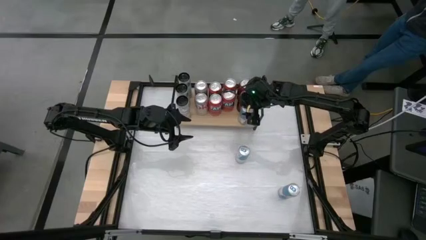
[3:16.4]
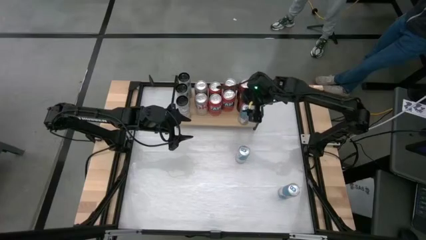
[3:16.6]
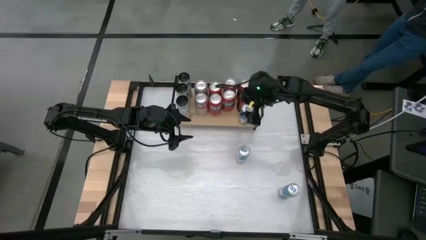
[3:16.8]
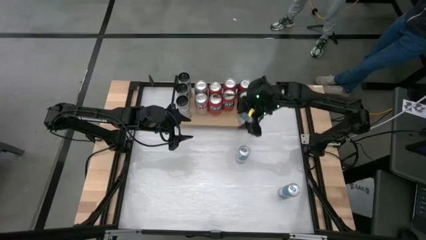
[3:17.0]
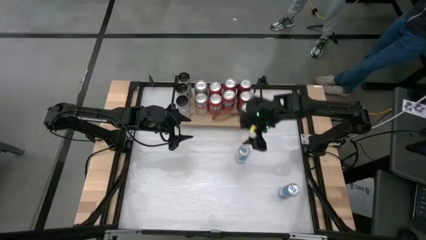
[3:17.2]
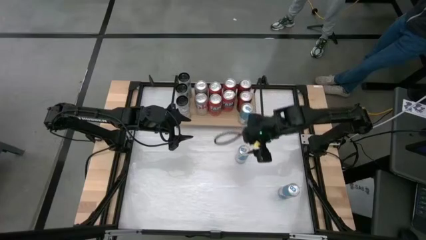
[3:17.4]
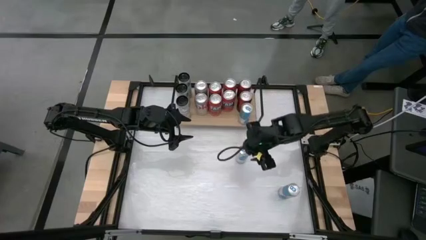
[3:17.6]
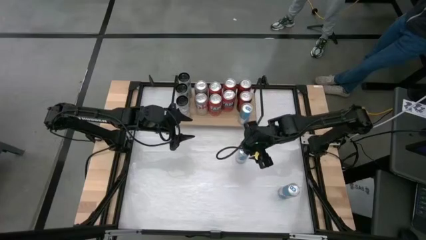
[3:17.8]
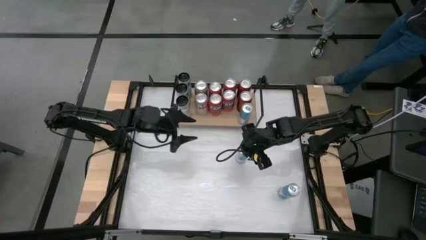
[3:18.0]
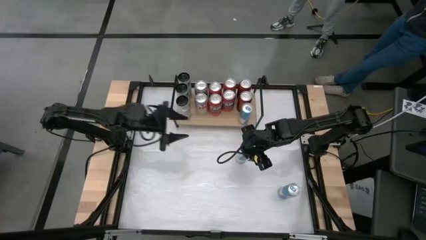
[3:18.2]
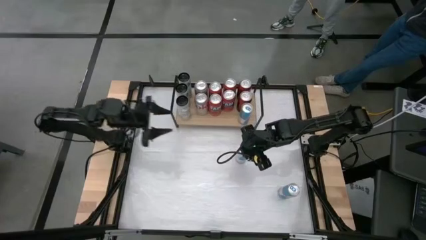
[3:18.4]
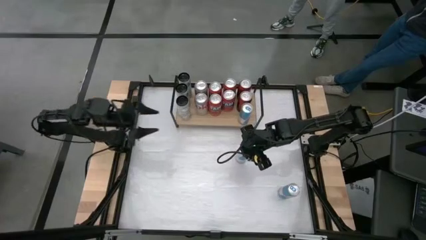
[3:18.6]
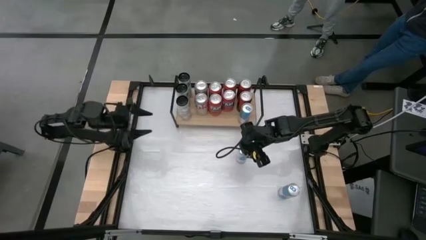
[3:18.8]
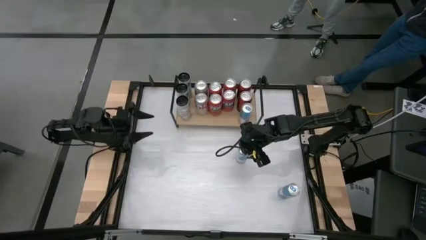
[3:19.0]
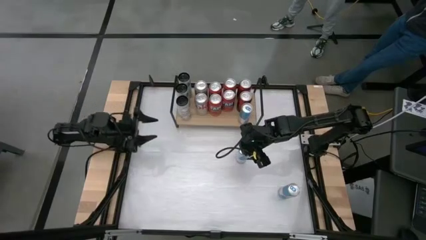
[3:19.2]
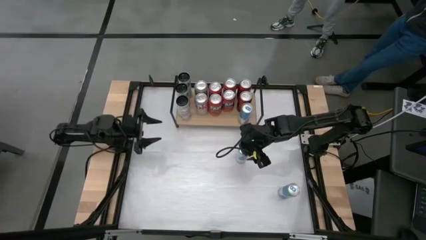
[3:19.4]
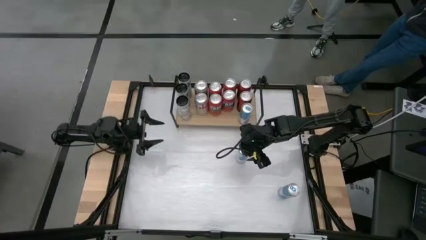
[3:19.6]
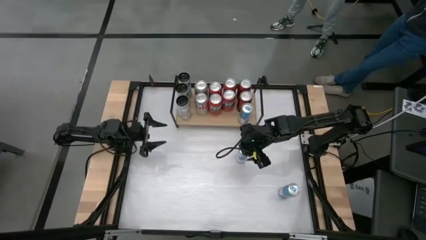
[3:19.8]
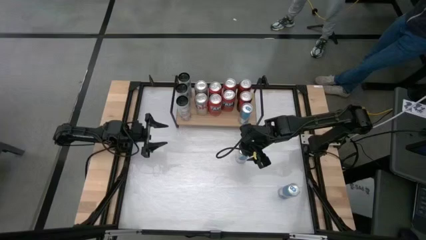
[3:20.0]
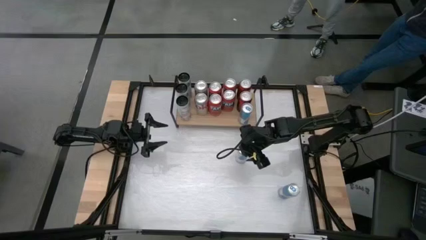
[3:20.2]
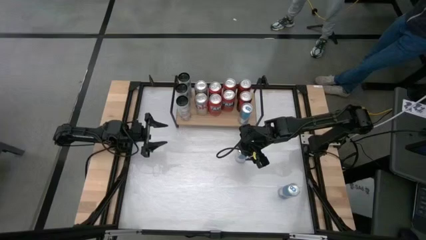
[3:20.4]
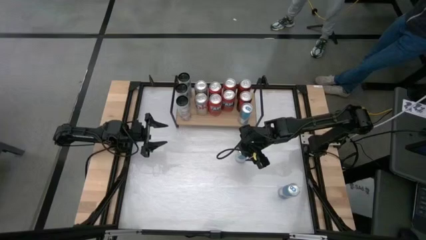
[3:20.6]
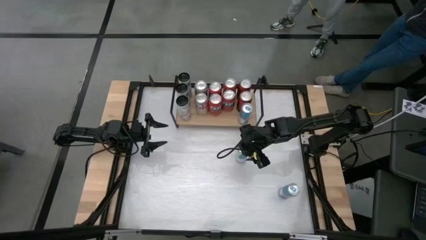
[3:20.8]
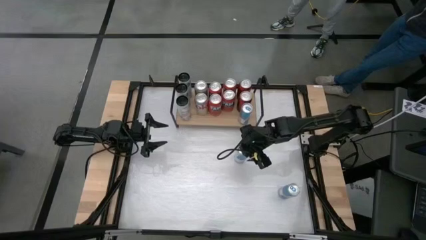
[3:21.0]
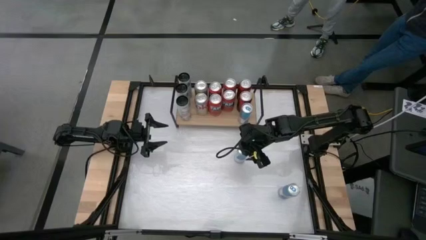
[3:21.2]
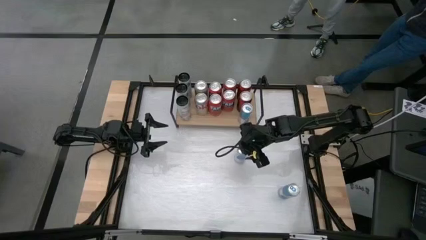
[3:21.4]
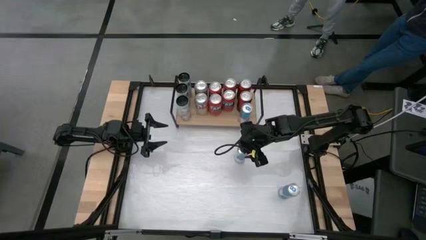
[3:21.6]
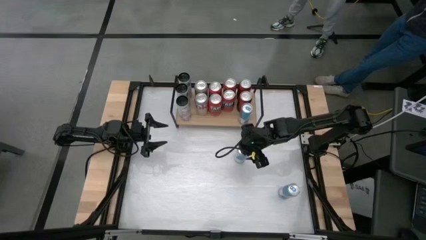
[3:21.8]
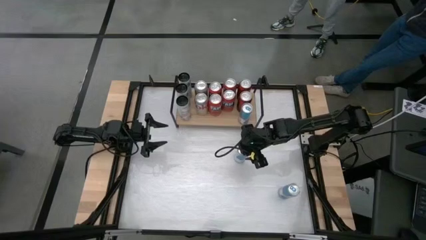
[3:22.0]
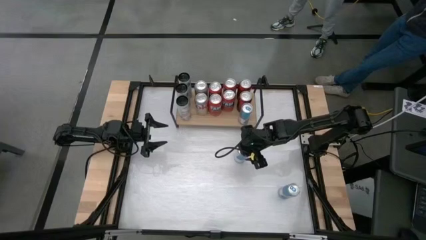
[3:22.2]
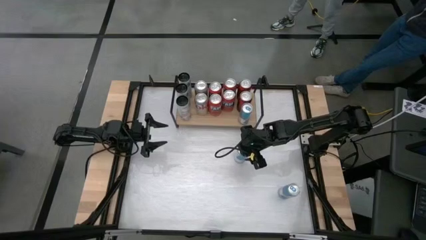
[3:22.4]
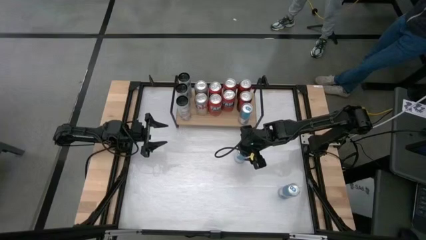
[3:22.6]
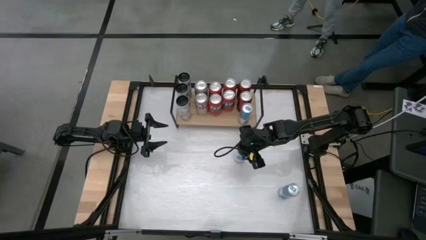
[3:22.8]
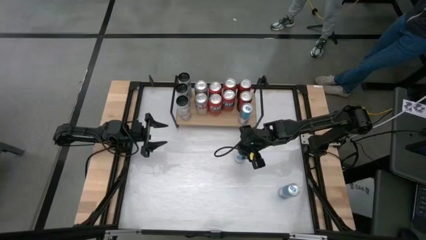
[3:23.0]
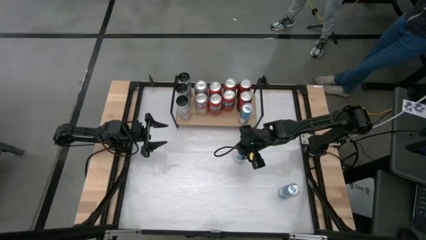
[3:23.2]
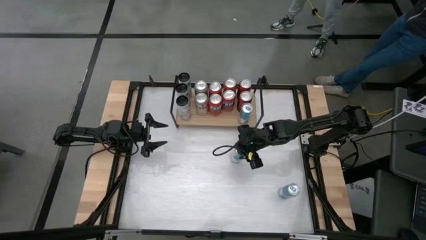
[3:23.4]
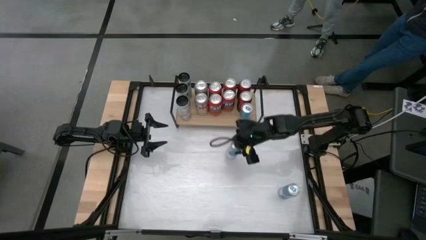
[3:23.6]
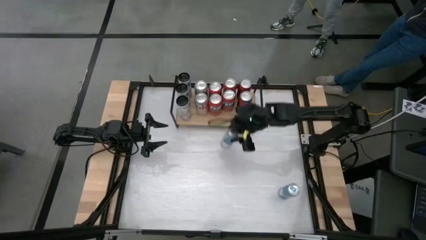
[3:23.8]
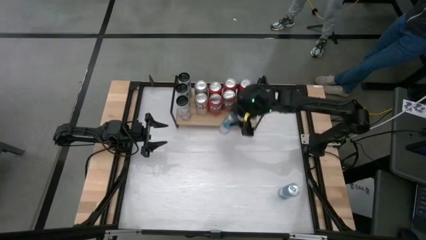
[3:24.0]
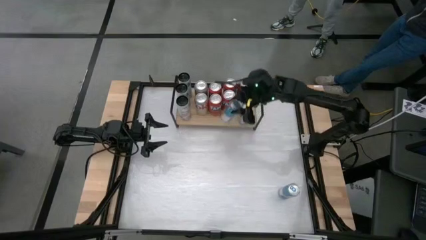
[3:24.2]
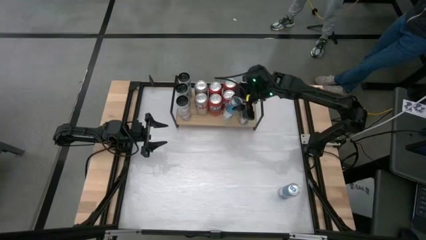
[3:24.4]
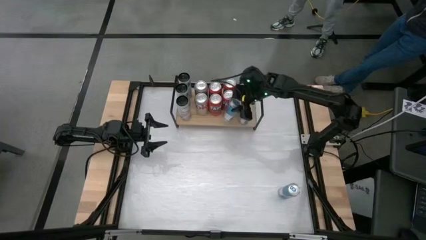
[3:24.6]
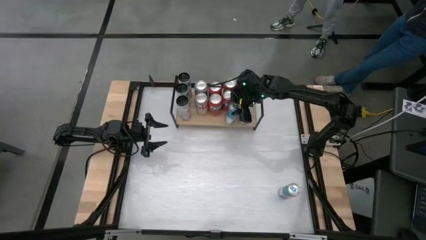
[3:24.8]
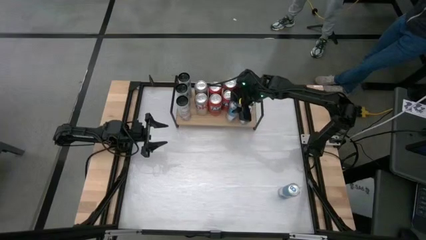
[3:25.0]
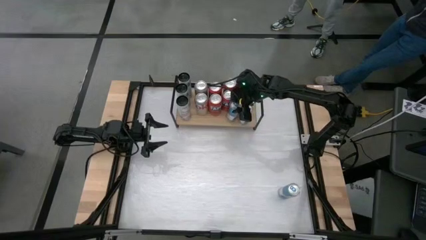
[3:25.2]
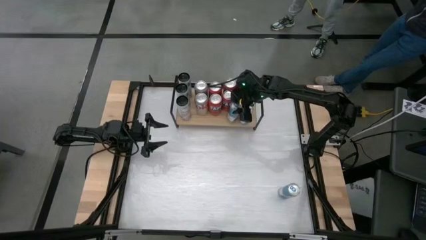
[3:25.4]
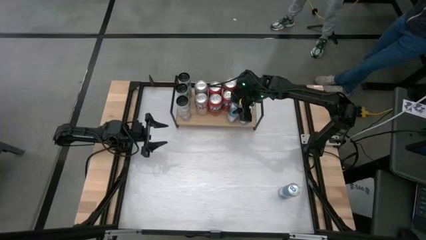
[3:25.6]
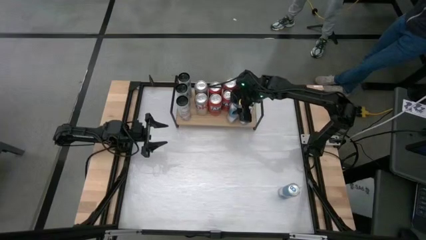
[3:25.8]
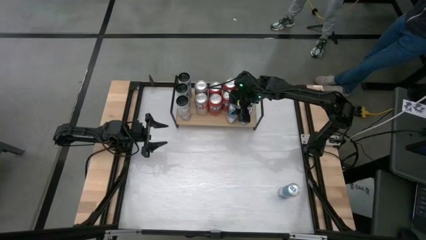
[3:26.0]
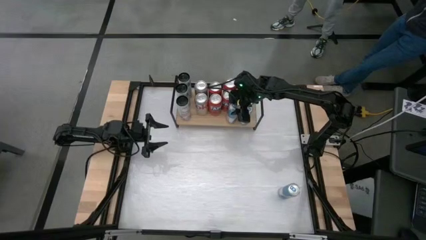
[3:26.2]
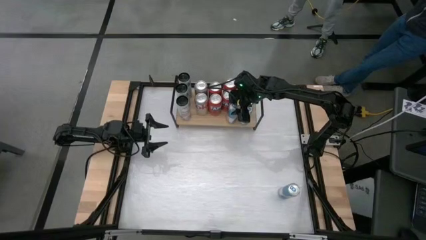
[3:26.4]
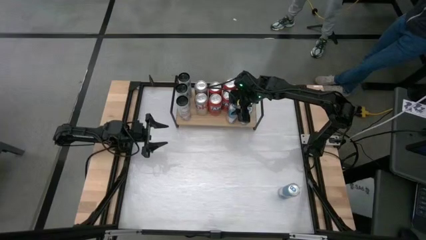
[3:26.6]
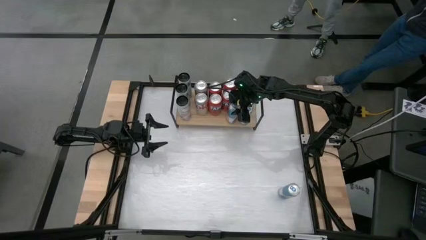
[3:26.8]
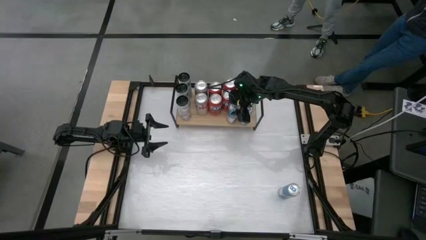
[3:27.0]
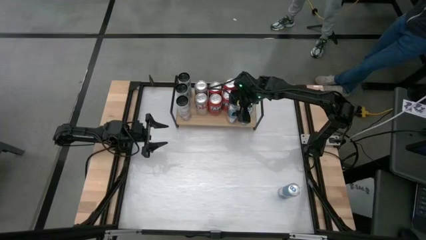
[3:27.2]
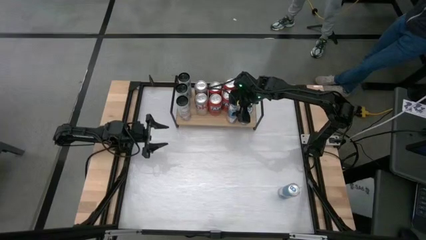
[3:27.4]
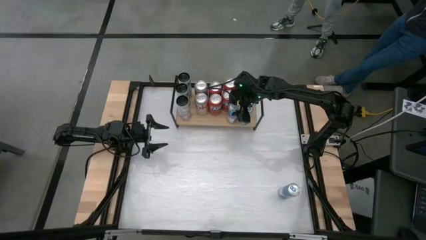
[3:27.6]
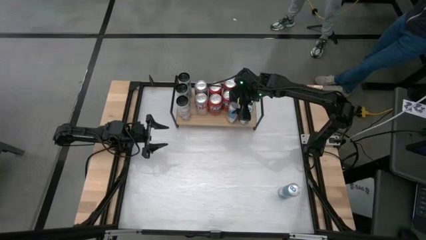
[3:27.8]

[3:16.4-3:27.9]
Task: Place canned beverage on shelf
Put the white and blue soda can on the shelf aligned with other pink soda can
